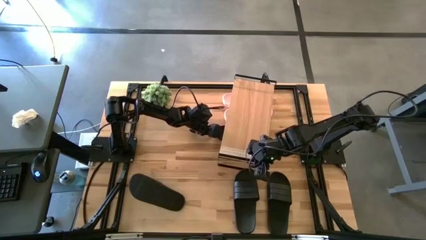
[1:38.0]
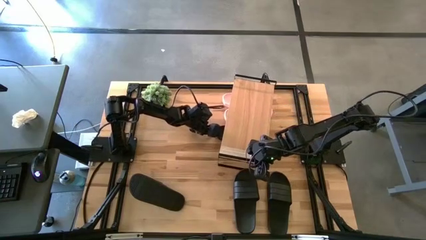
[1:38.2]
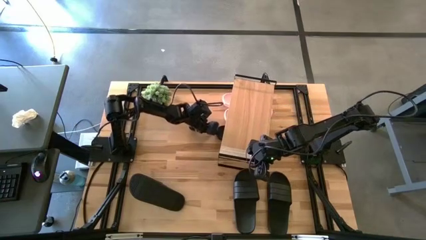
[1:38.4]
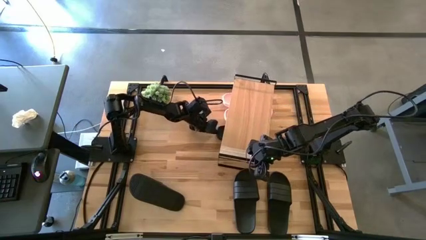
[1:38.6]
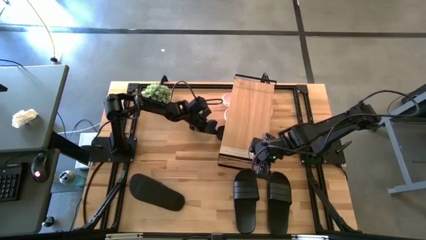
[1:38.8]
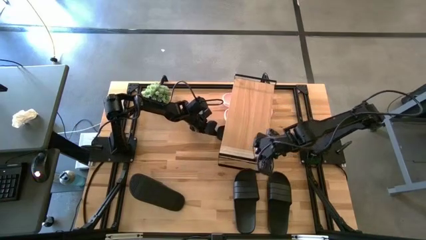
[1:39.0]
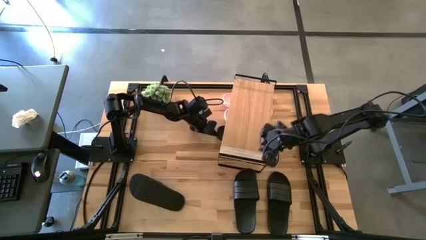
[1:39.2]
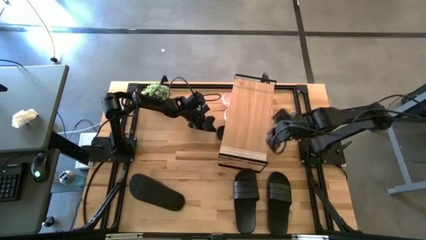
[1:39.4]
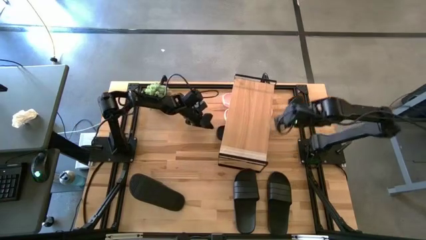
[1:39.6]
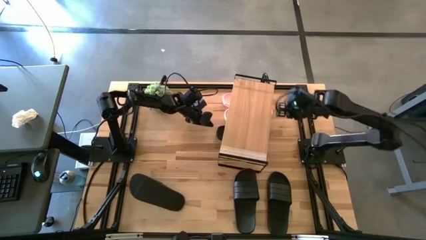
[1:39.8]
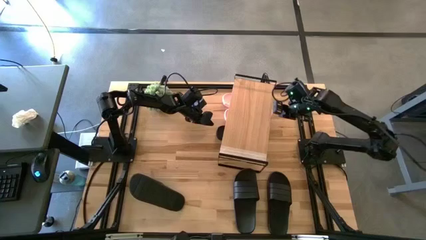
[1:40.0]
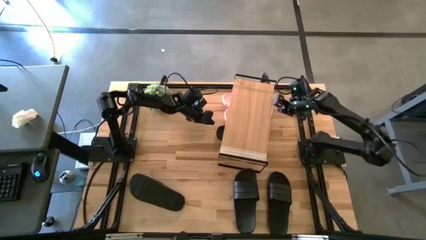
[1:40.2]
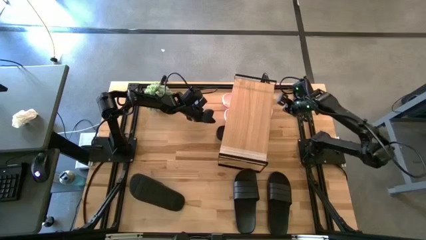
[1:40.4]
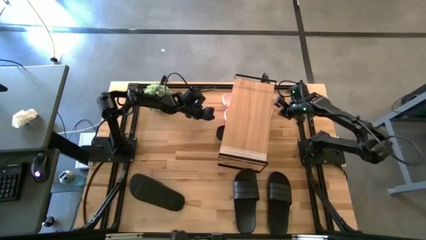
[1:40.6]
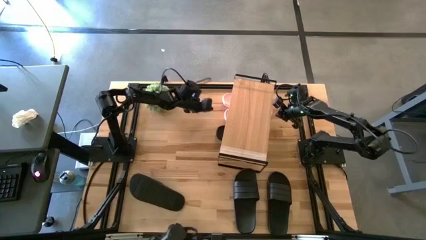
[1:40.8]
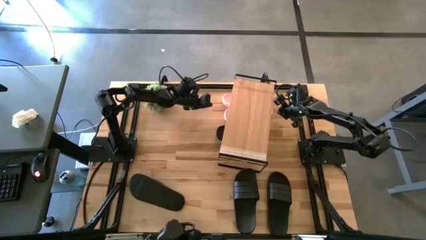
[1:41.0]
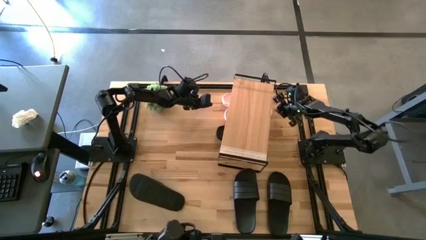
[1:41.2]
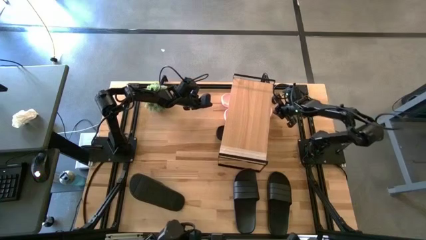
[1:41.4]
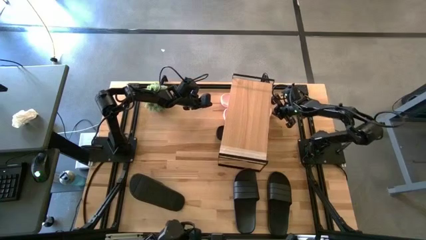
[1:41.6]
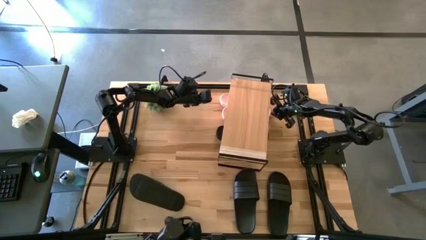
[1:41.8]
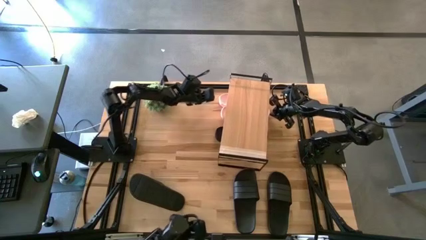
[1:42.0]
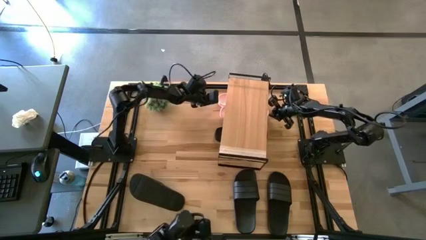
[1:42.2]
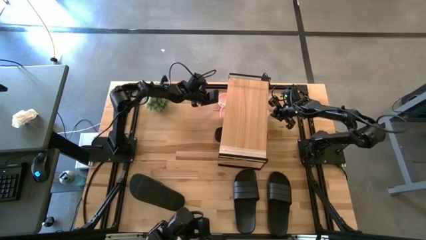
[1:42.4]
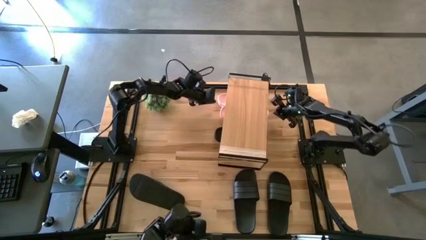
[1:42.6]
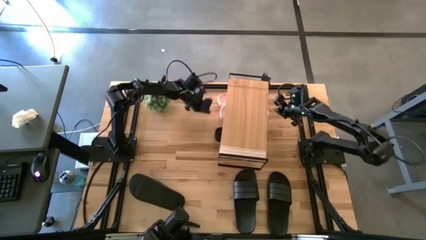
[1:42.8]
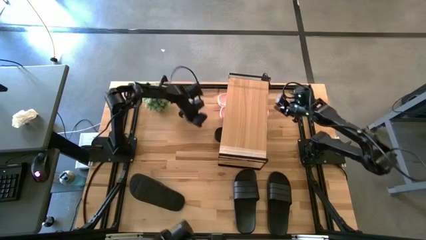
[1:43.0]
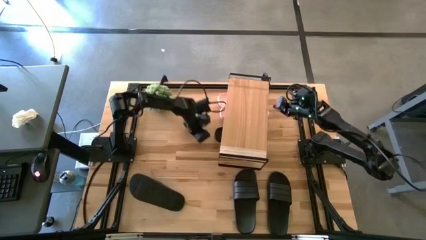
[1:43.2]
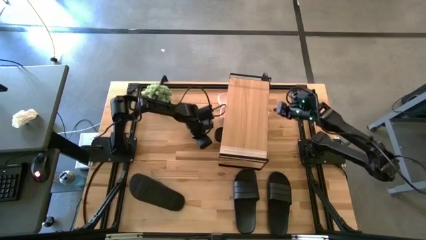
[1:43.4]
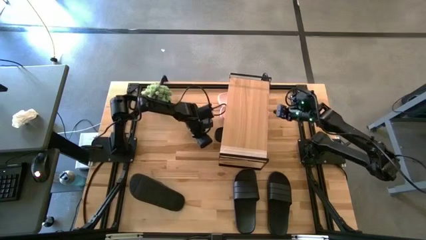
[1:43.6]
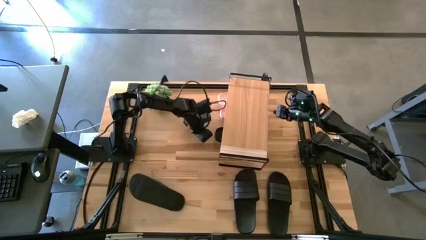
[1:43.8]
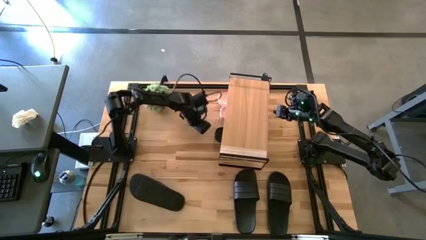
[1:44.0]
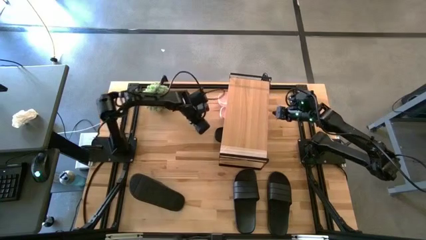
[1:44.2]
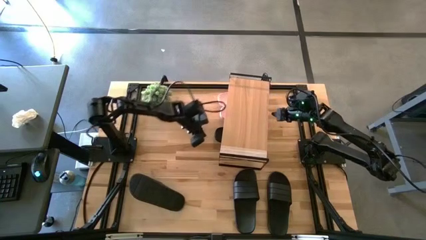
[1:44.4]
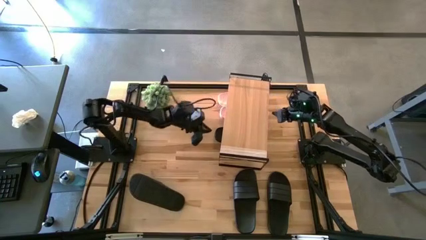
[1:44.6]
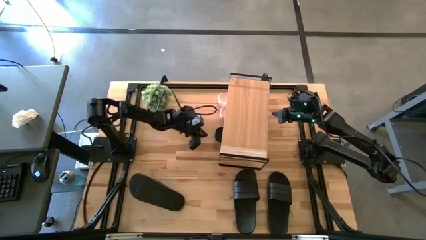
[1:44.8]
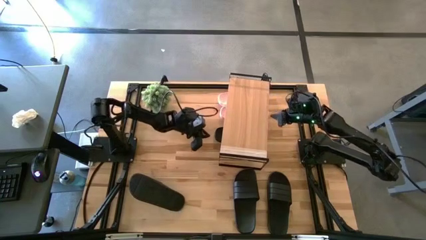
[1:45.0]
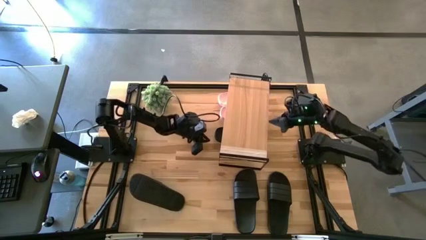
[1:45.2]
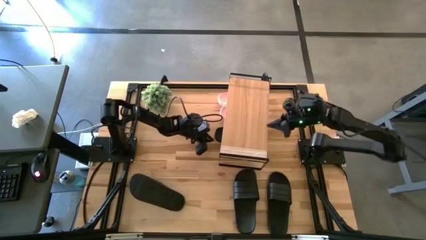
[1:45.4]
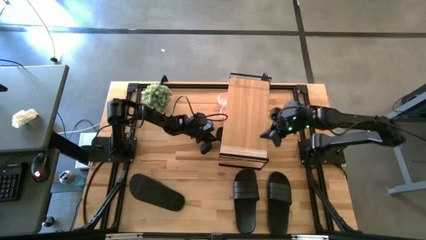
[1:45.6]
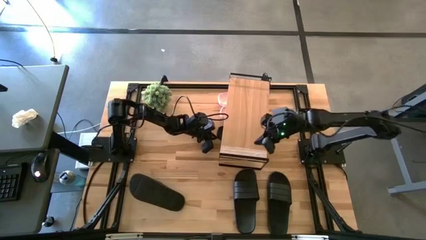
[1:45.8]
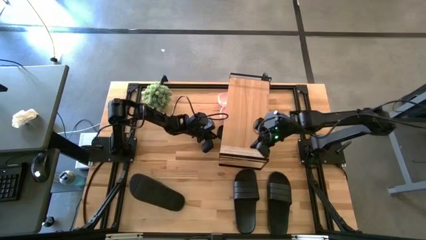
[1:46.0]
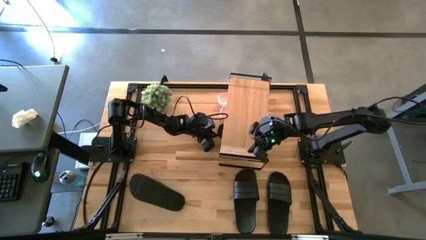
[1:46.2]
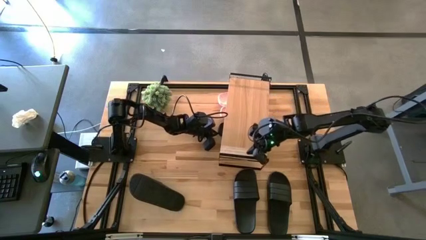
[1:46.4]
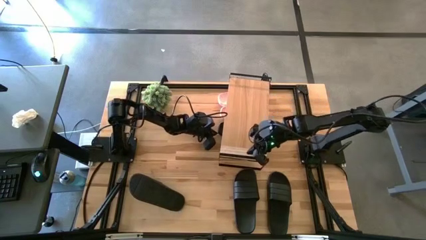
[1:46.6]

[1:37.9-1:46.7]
Task: Pick and place slides into the shelf
Adjust the slippers under the shelf

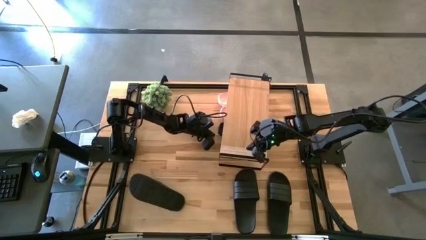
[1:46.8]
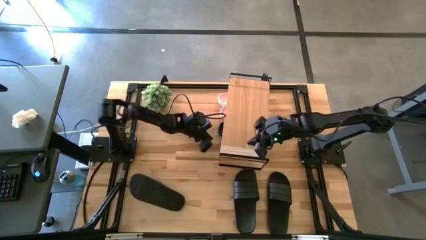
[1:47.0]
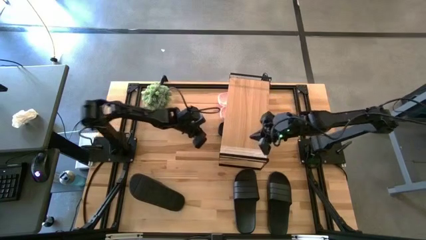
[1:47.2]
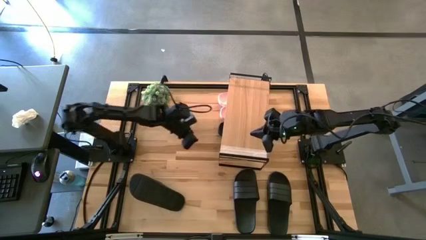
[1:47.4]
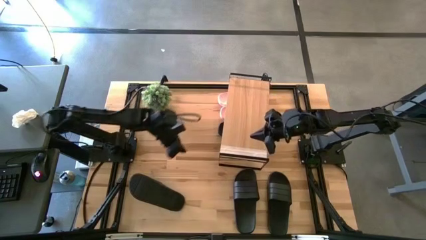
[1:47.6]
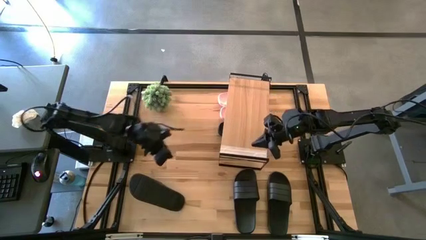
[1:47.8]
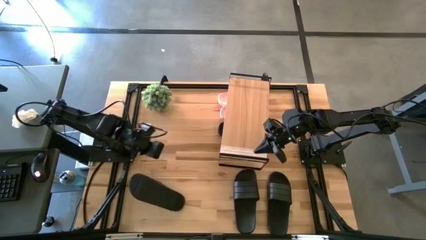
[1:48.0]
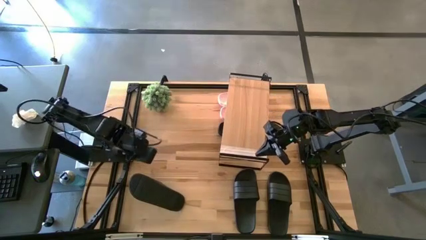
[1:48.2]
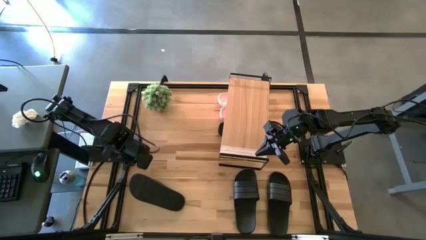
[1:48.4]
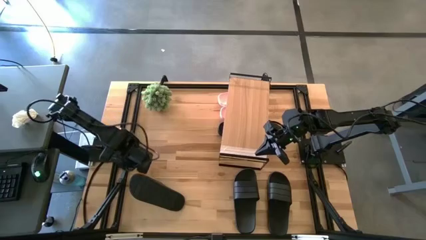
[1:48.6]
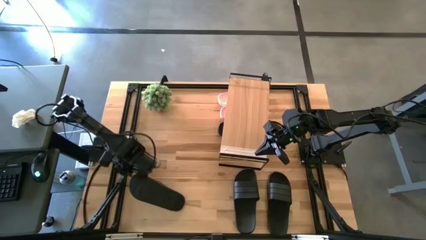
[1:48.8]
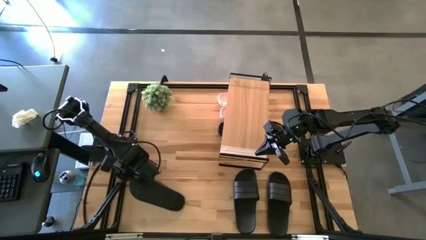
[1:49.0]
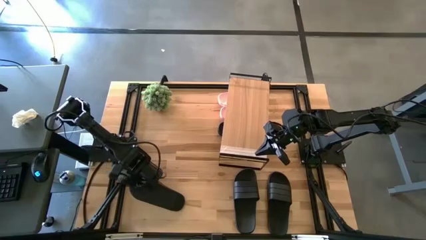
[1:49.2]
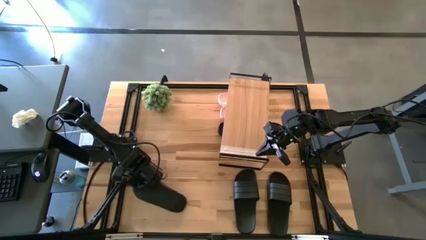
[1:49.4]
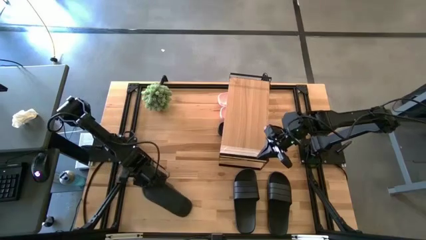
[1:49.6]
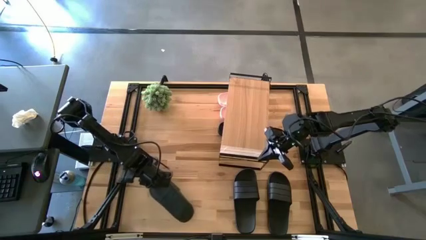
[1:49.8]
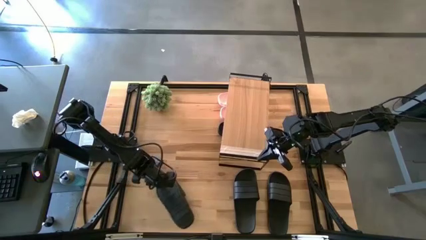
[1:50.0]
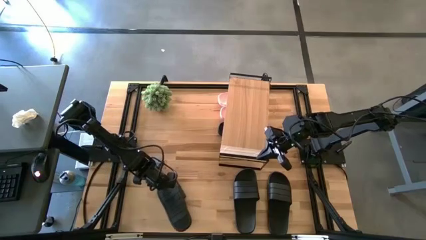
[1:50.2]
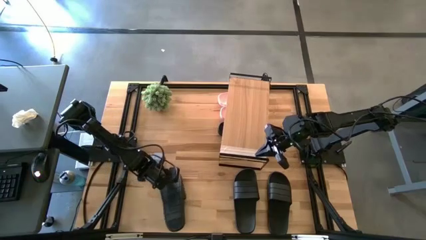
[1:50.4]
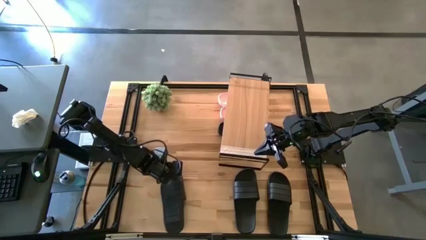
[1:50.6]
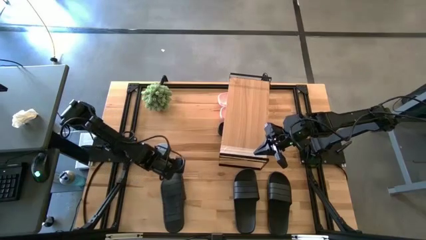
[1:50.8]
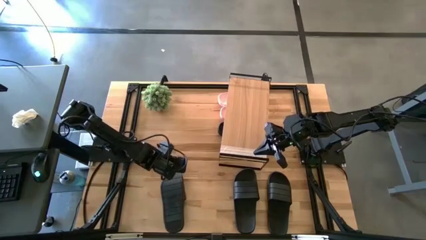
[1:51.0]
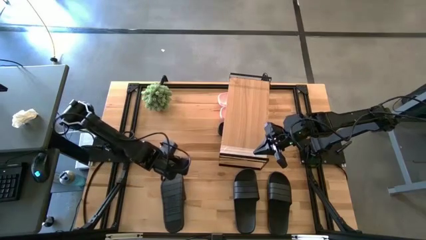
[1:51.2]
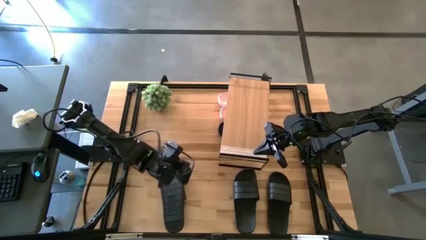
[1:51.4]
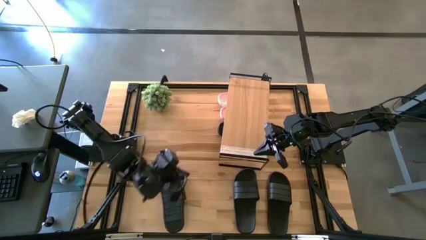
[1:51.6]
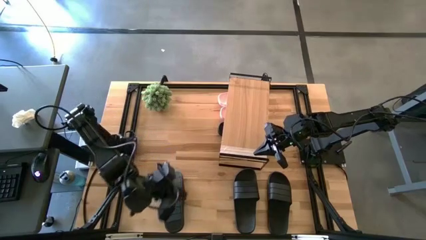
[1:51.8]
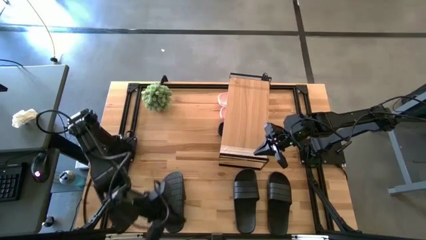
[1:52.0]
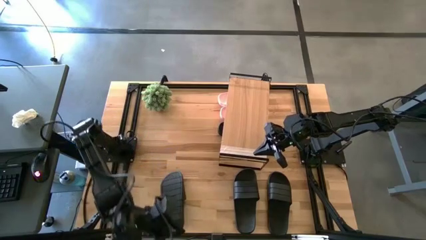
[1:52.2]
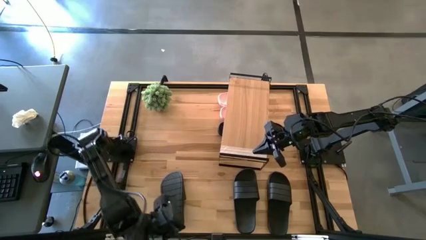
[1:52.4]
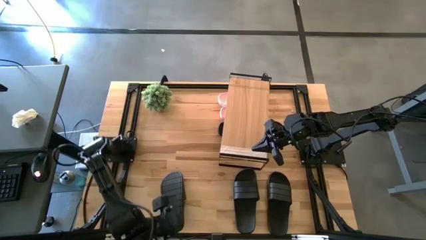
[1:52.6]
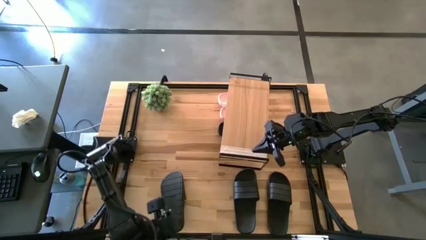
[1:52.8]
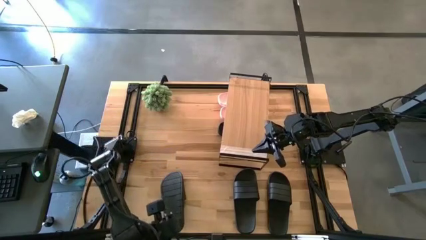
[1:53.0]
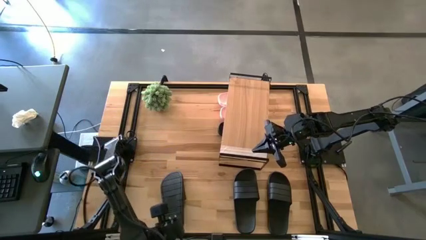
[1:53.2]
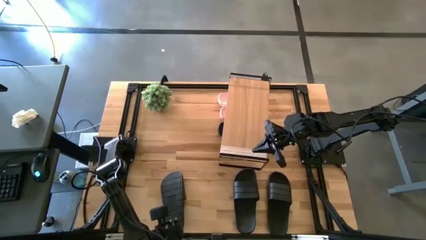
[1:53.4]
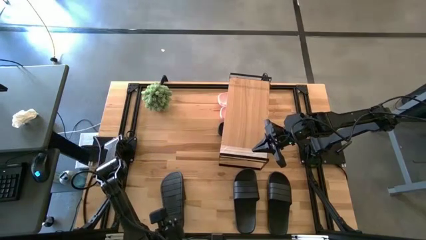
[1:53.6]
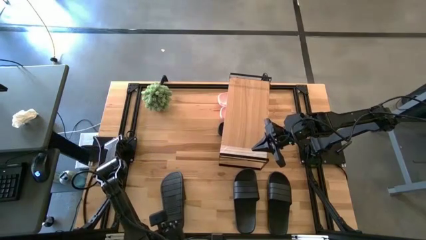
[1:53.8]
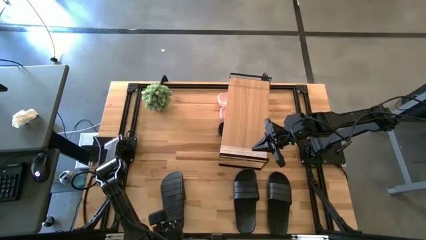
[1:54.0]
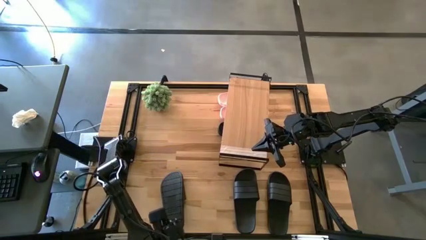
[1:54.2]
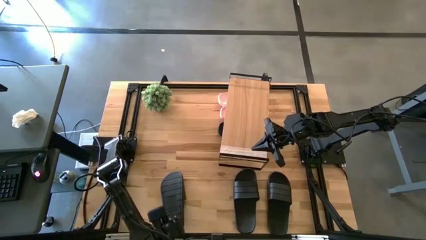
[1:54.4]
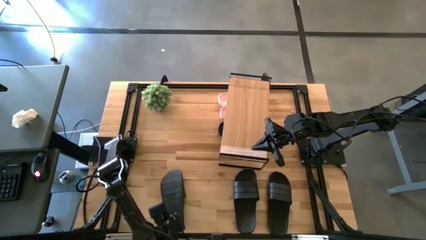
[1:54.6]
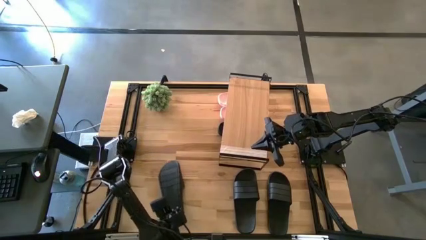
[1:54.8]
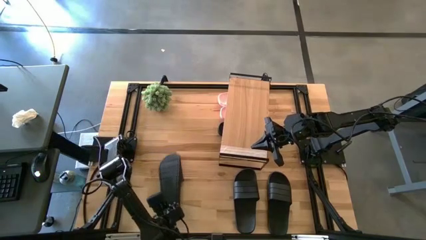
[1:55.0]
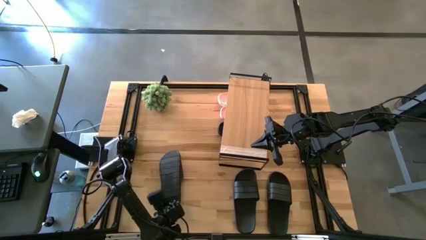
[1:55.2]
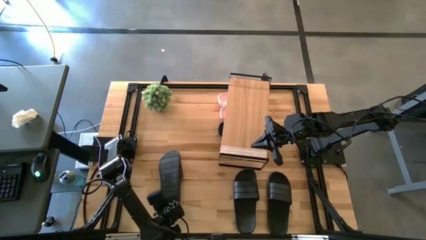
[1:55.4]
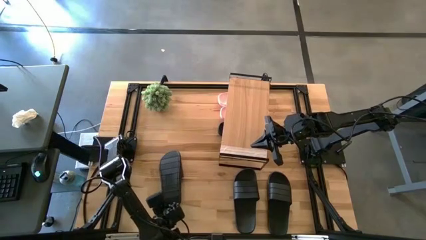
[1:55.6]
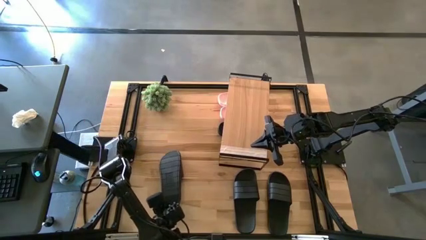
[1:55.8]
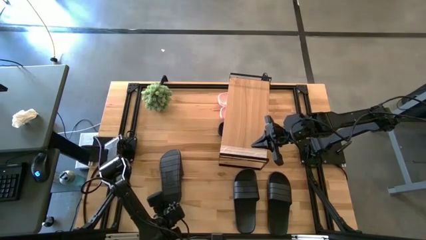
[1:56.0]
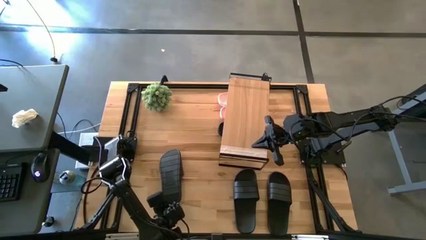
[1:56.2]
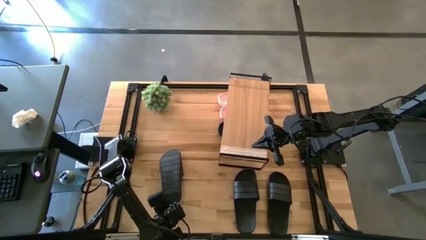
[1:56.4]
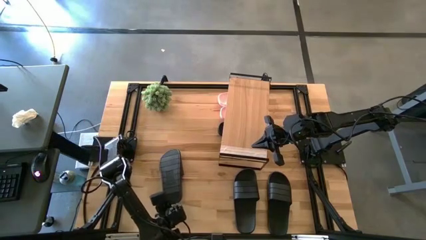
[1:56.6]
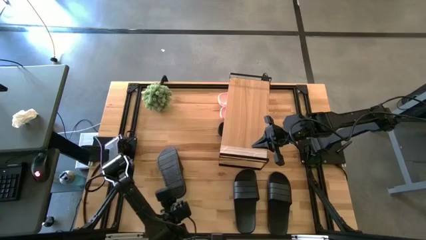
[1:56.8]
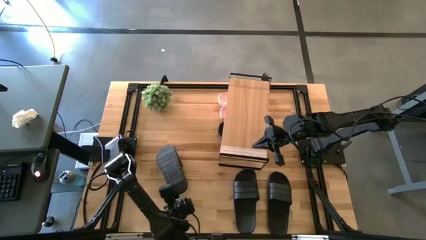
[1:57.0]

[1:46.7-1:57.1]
Put the black slipper under the shelf
